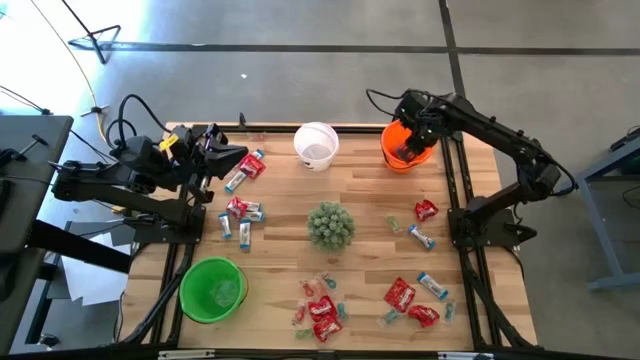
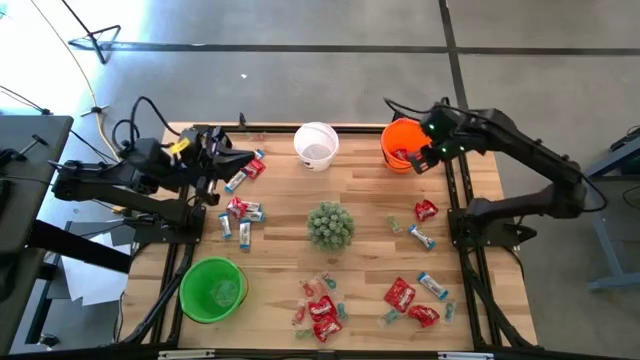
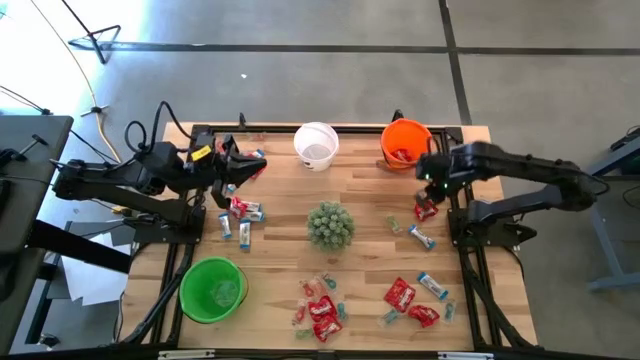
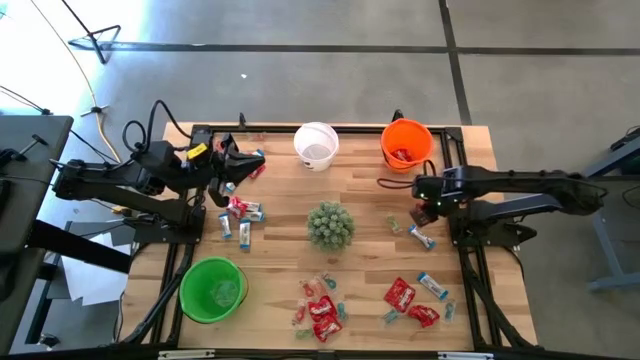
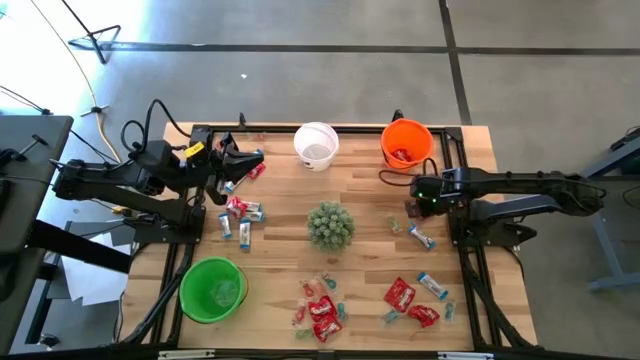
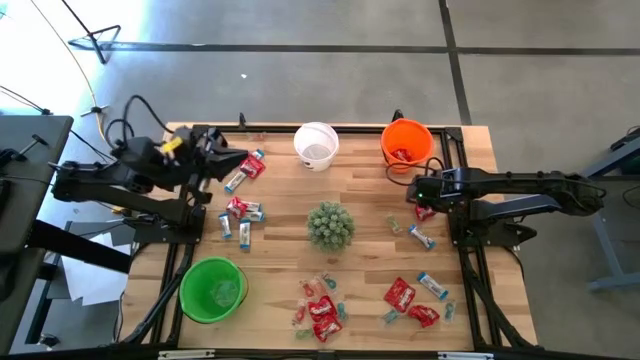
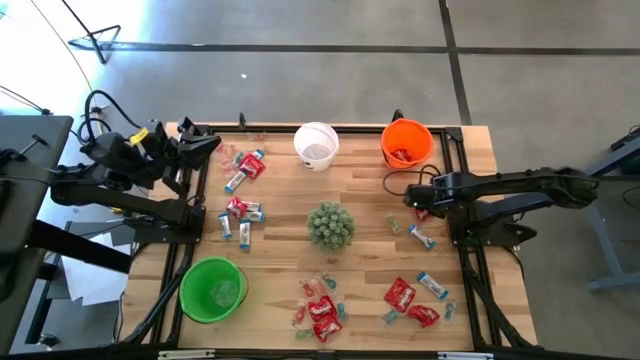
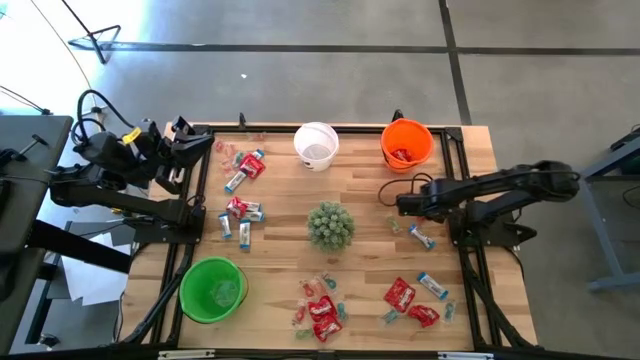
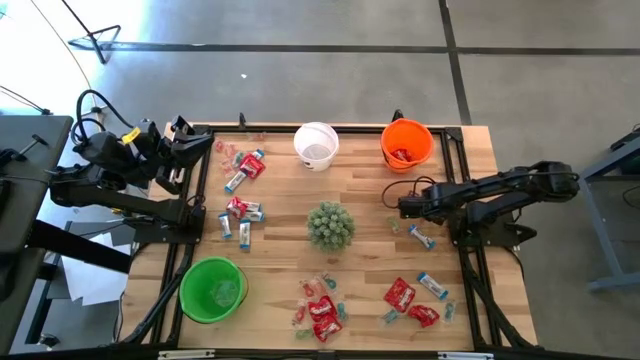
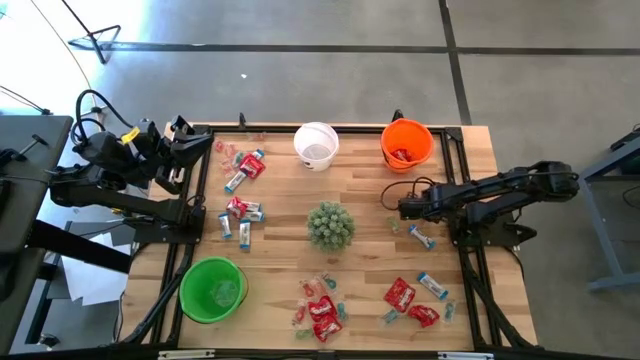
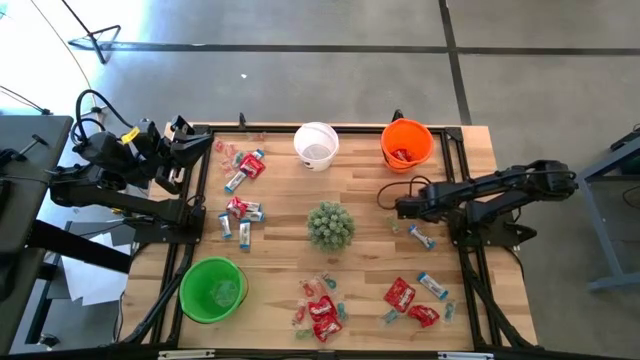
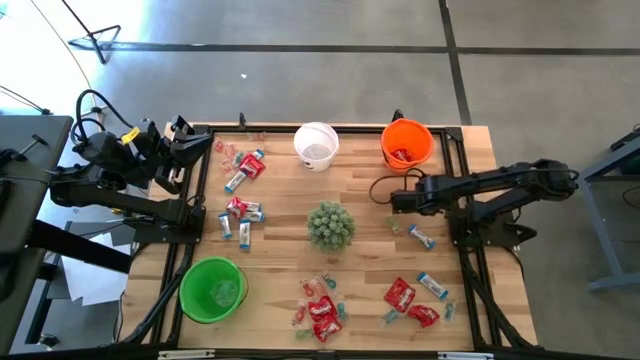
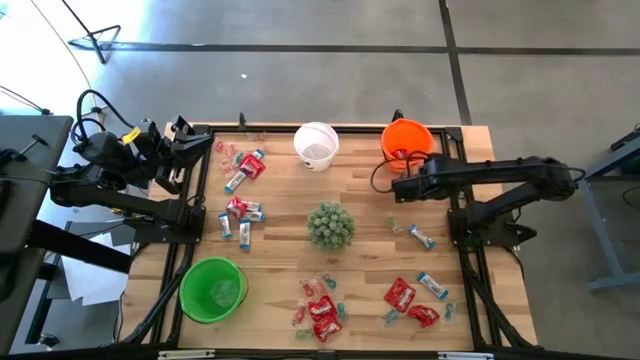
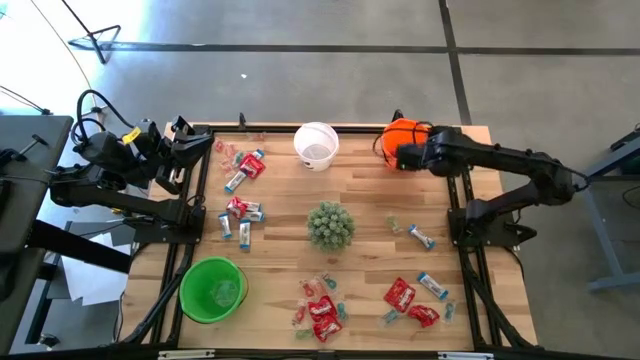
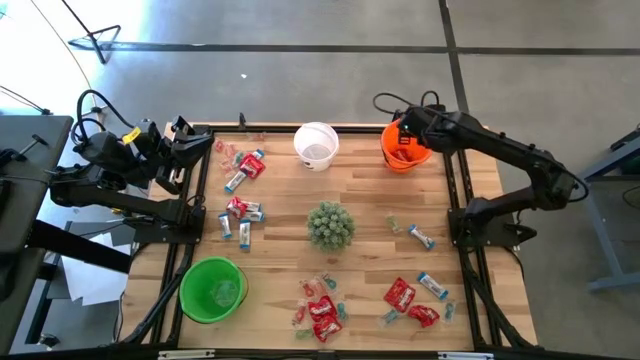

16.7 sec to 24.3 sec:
Task: Sort candy
Put the red candy into the orange bucket

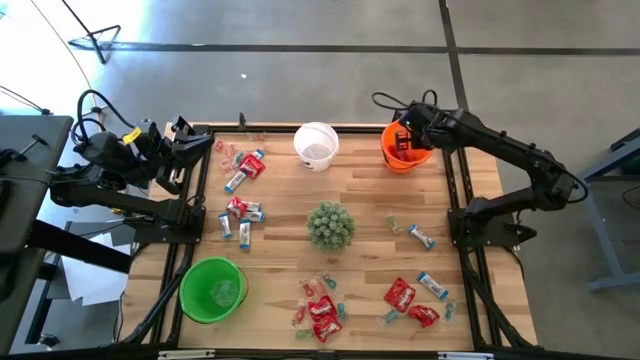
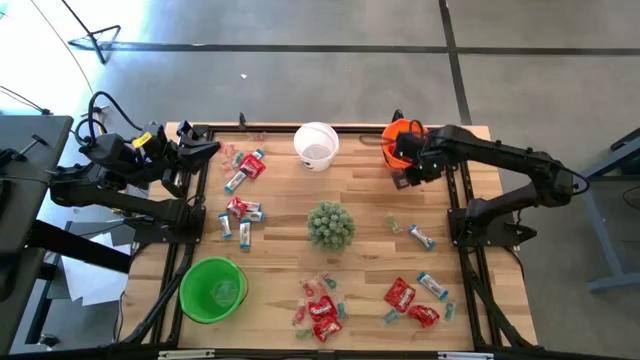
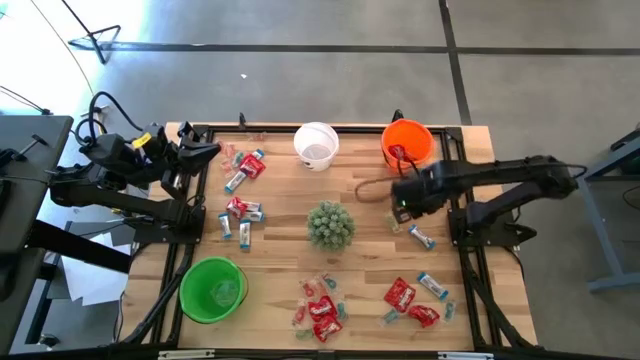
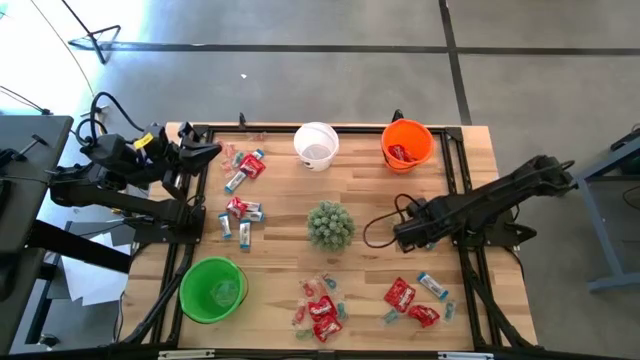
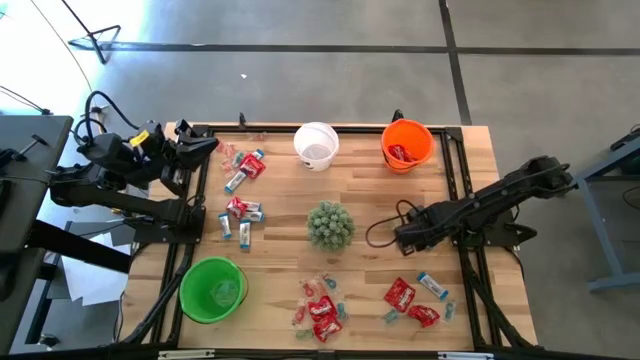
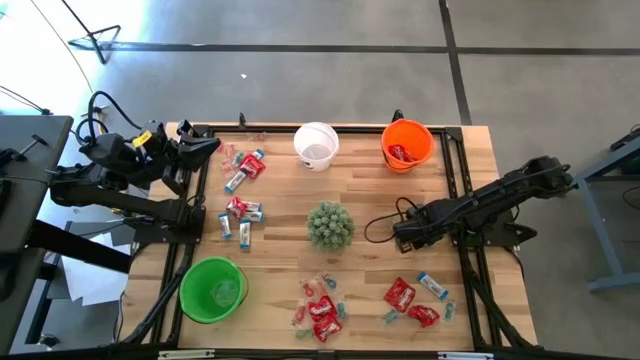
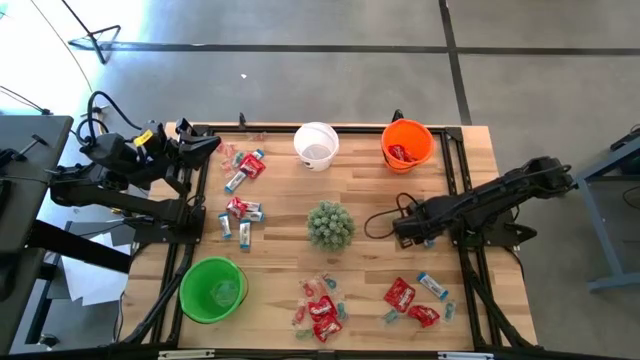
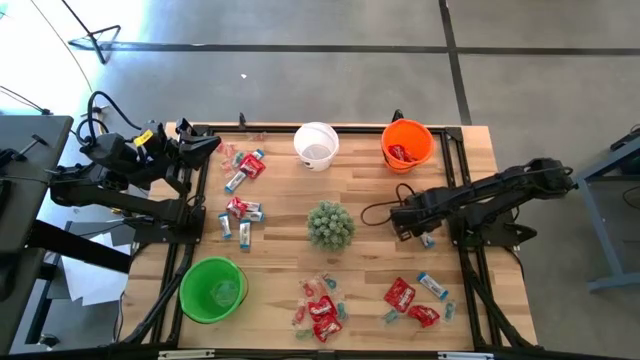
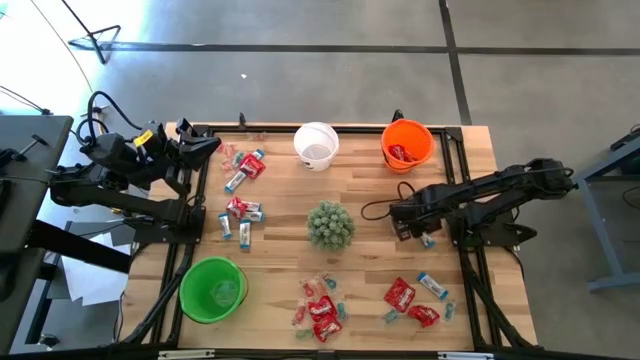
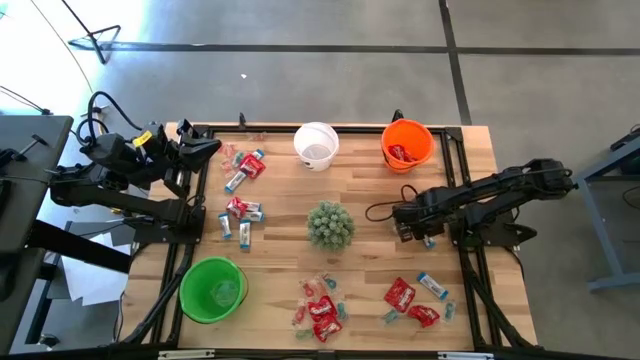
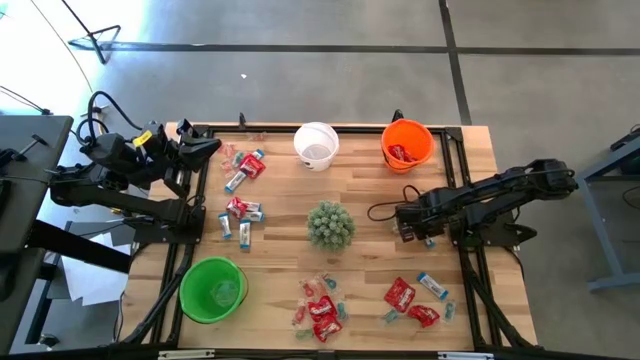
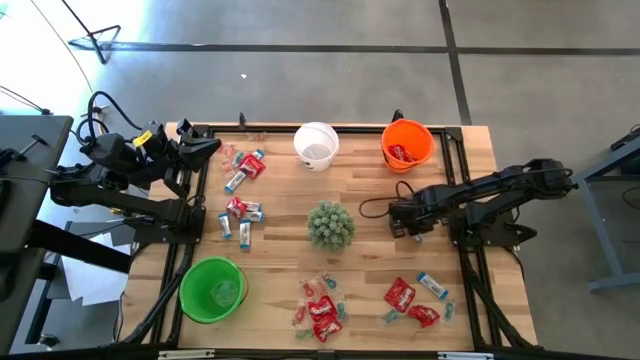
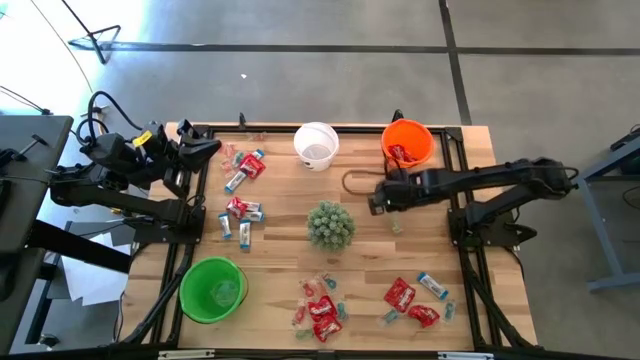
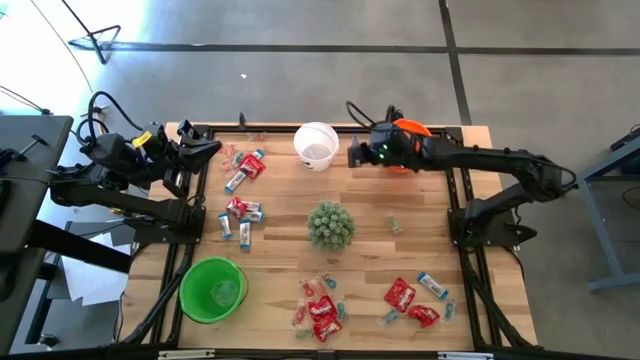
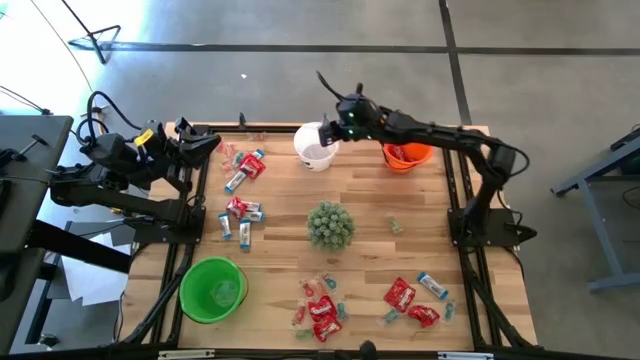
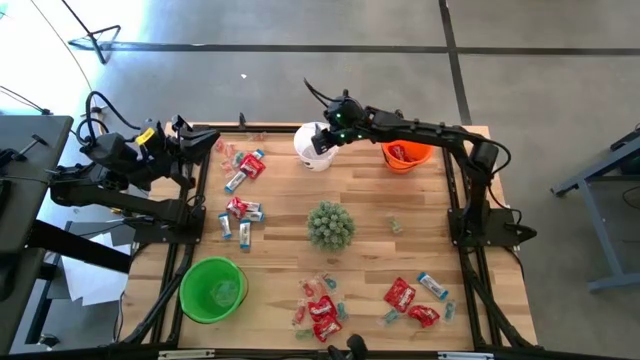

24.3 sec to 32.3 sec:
Put the white chocolate into the white bucket

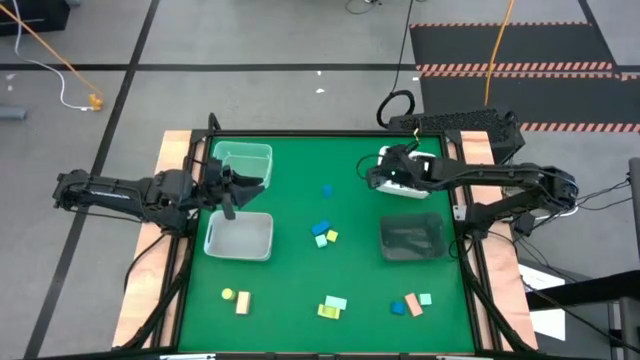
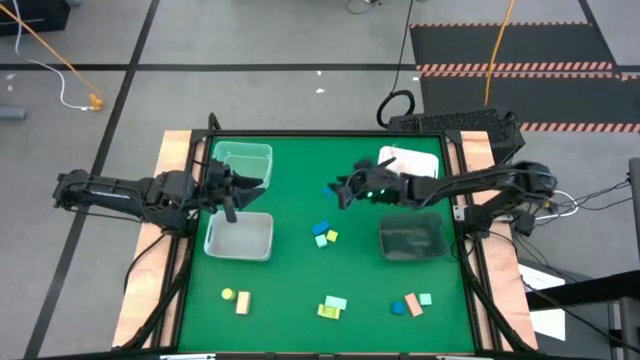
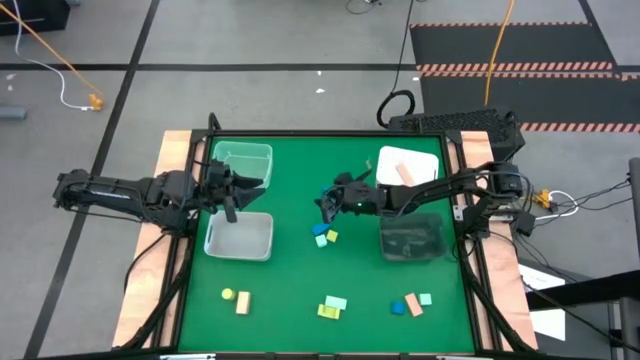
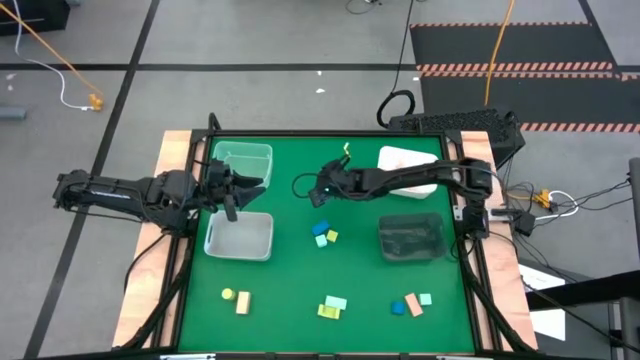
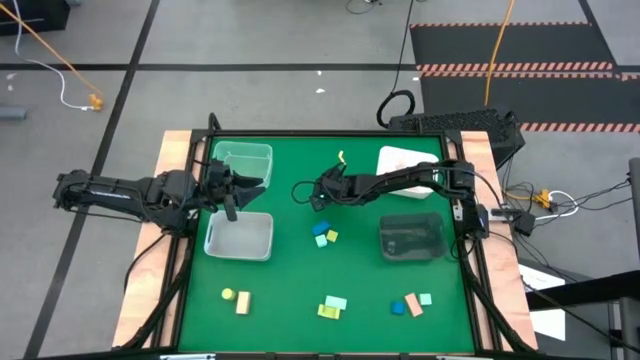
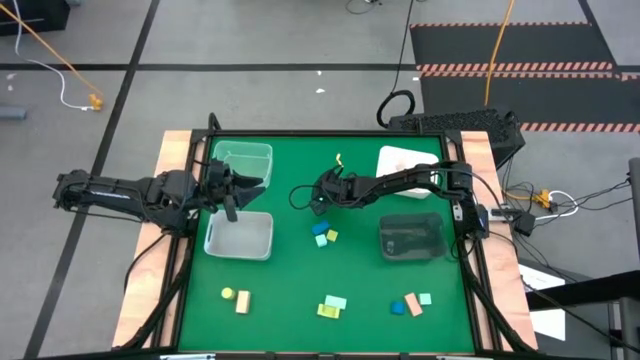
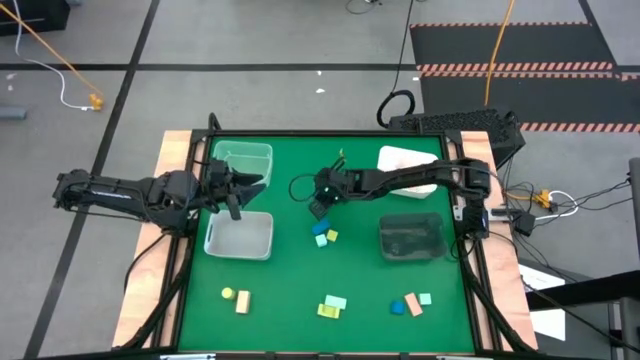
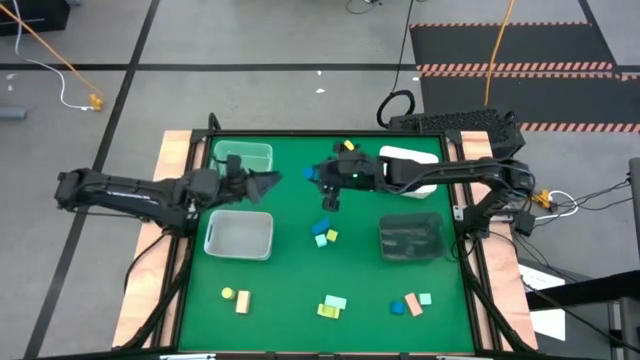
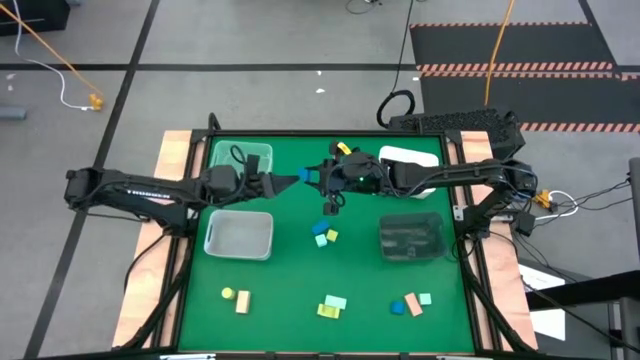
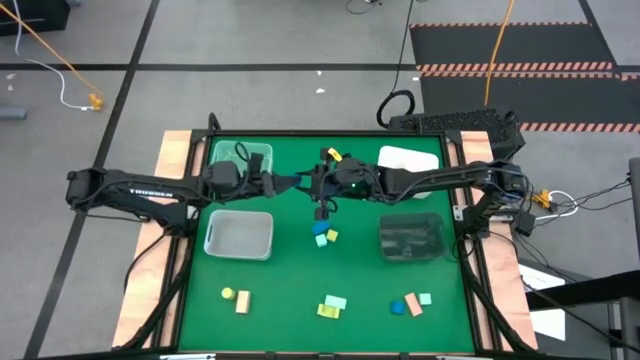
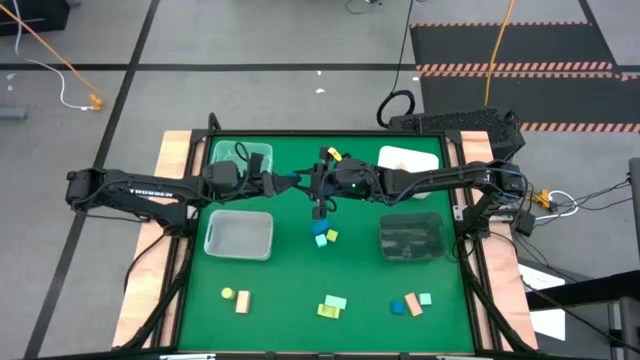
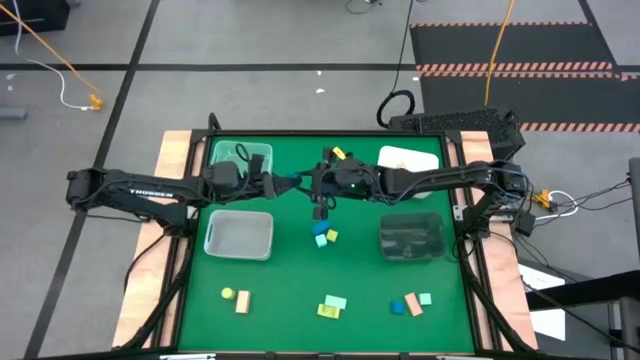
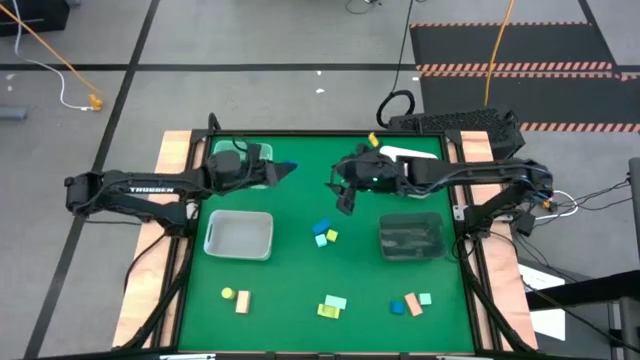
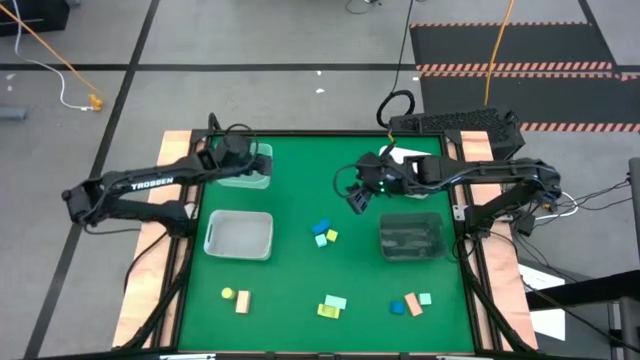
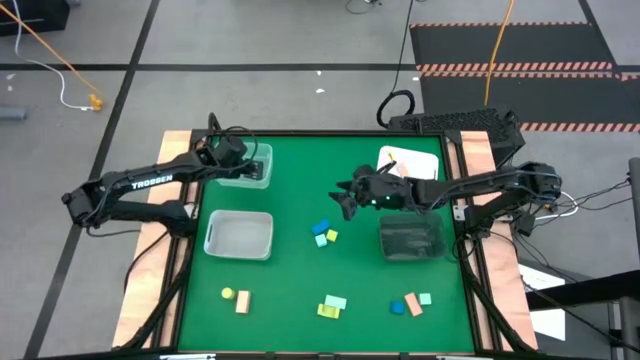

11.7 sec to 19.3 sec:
Task: Sort & place blocks by color
Put the top blue block into the white transparent bin
